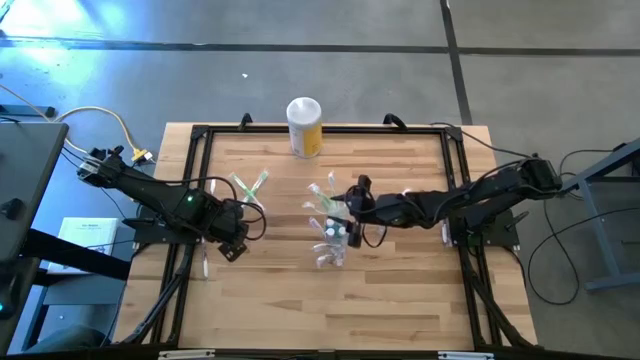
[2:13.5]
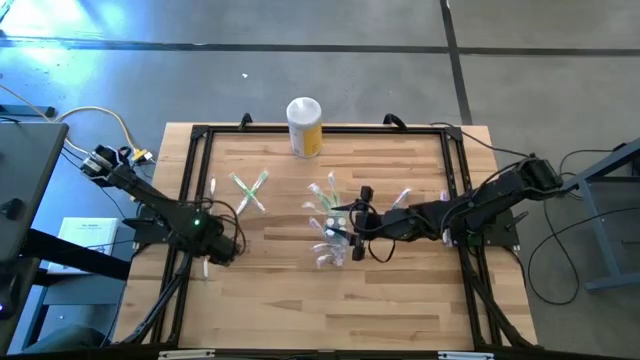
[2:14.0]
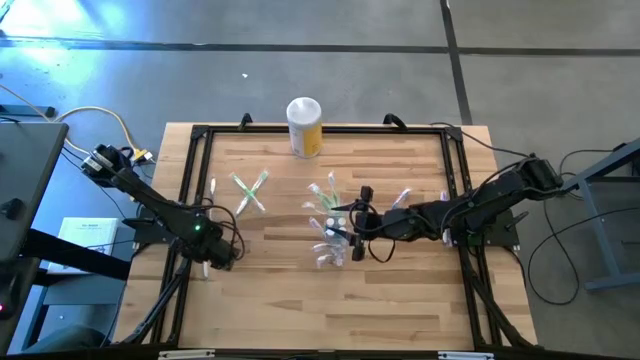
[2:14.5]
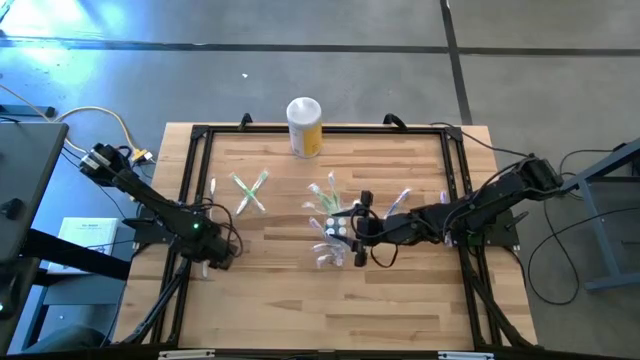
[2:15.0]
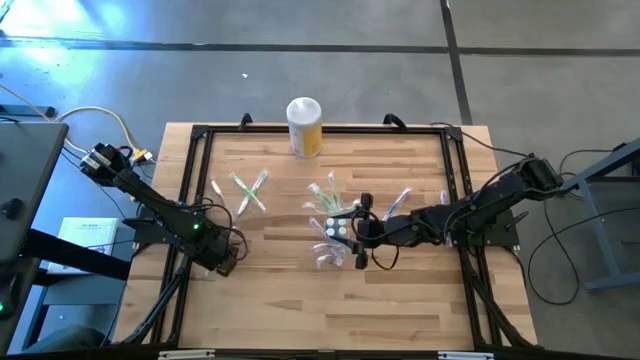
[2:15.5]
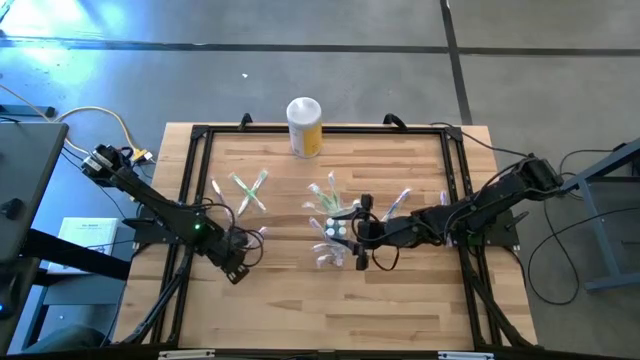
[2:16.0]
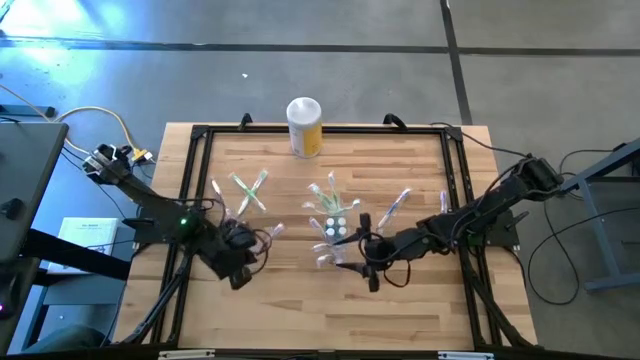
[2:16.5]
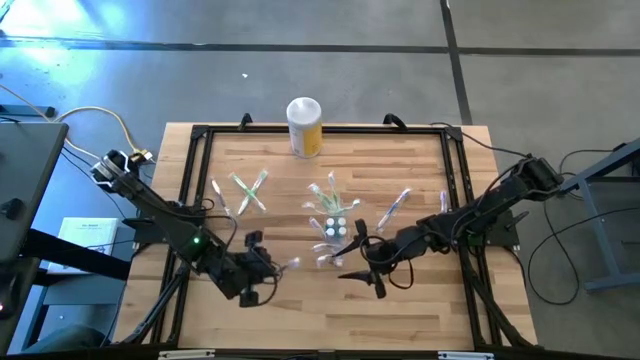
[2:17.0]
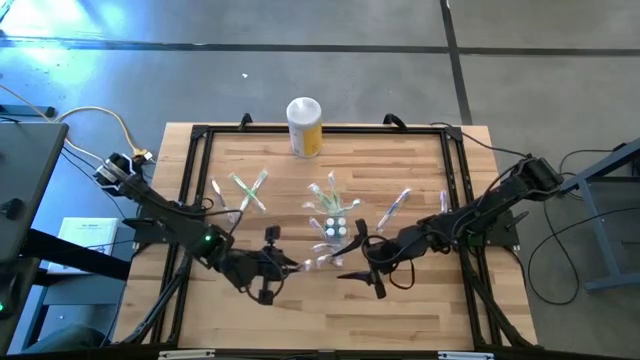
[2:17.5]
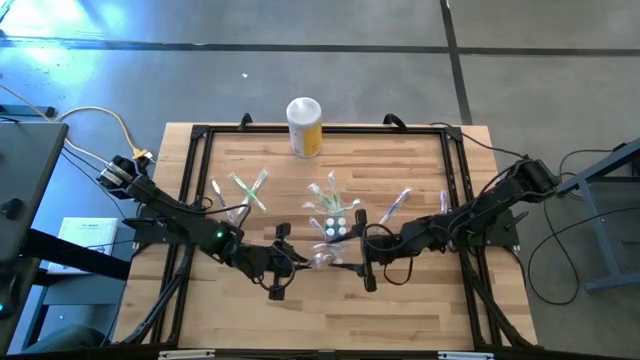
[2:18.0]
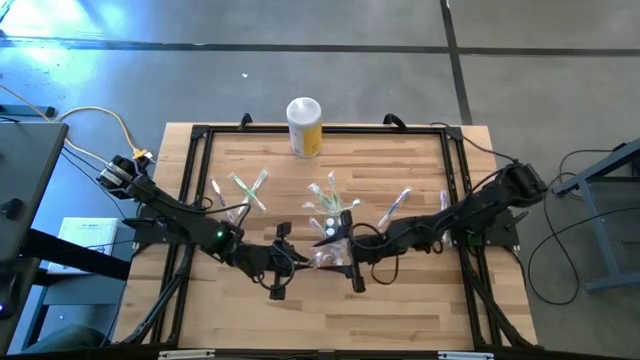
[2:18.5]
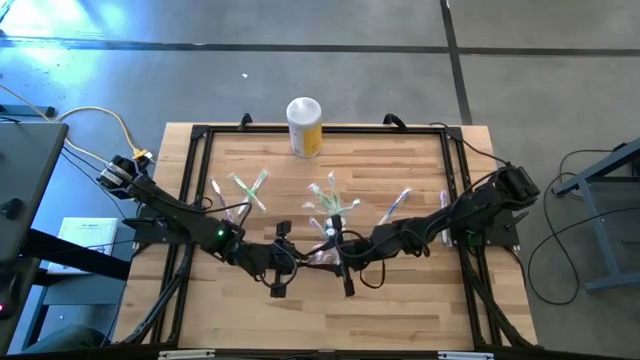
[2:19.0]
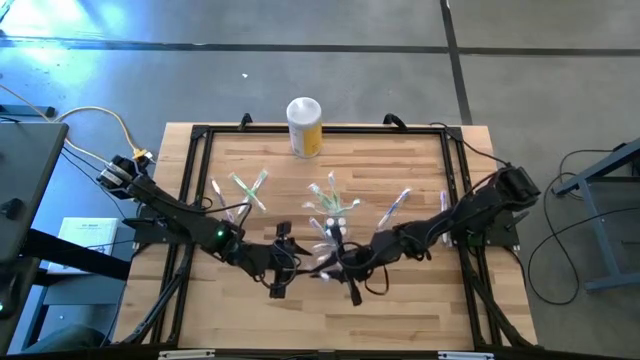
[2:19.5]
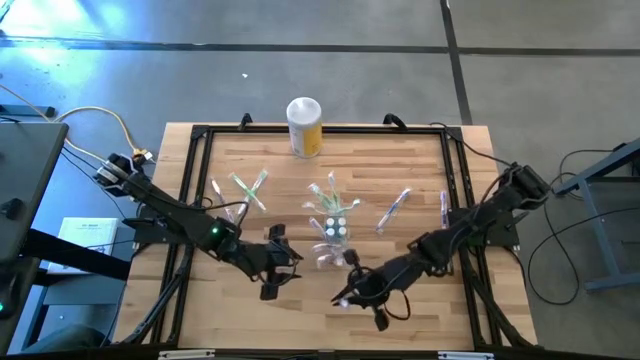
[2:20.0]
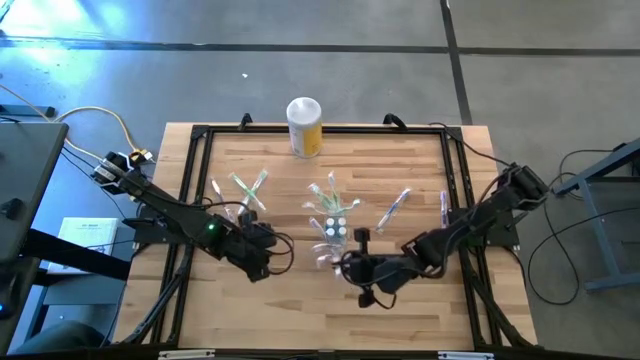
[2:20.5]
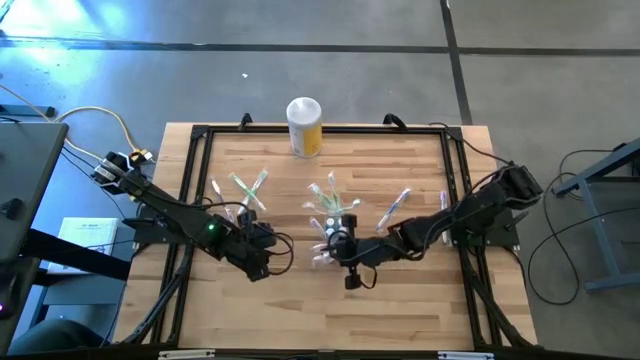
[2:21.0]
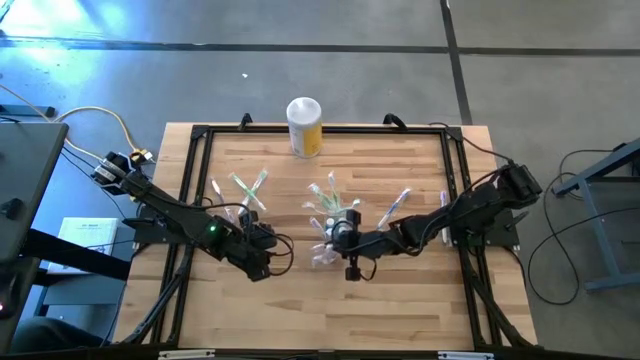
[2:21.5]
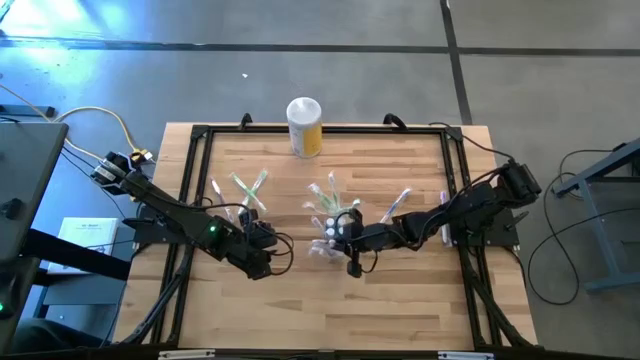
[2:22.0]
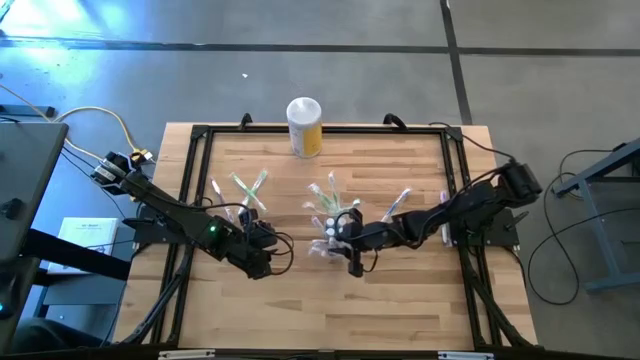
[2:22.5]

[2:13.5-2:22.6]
Task: Pick & Place toothbrushing station
Put the purple toothbrush into the transparent organizer

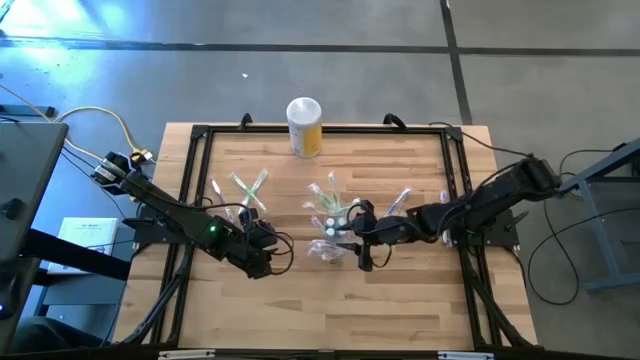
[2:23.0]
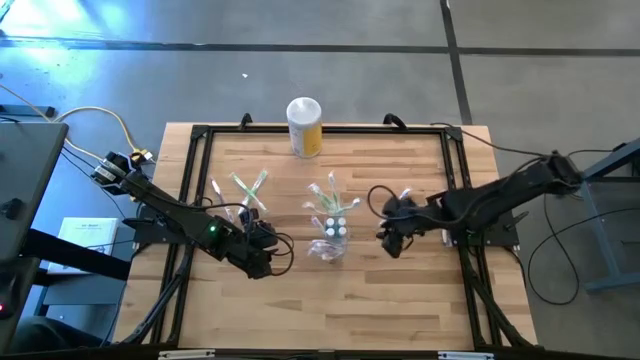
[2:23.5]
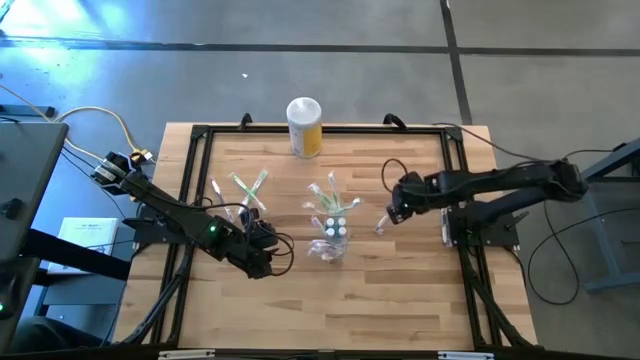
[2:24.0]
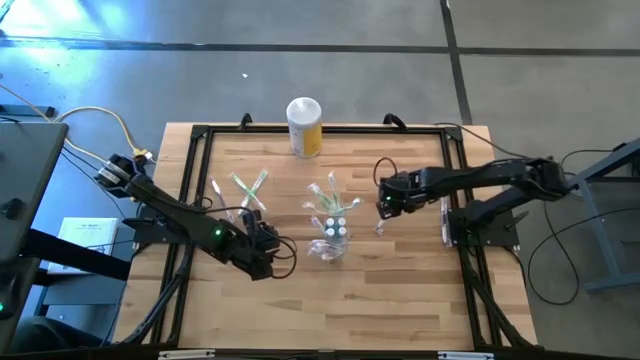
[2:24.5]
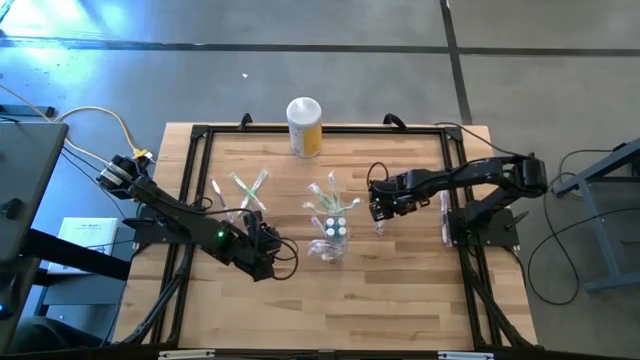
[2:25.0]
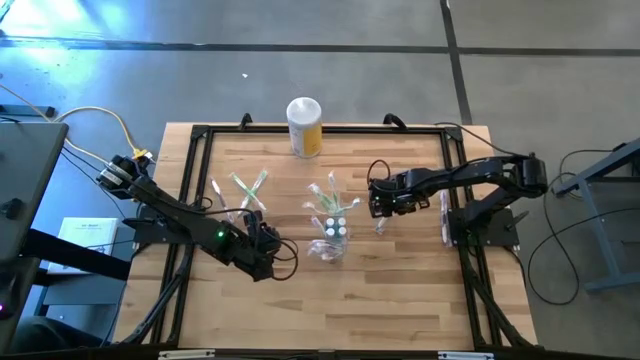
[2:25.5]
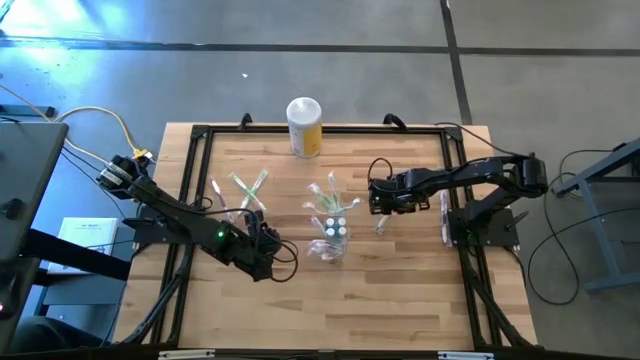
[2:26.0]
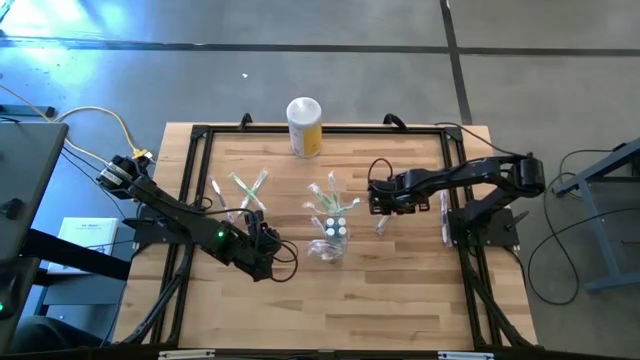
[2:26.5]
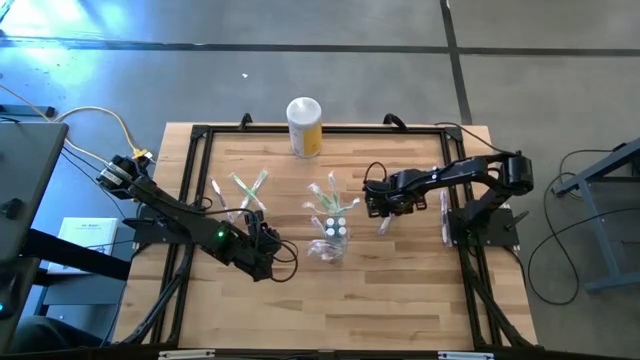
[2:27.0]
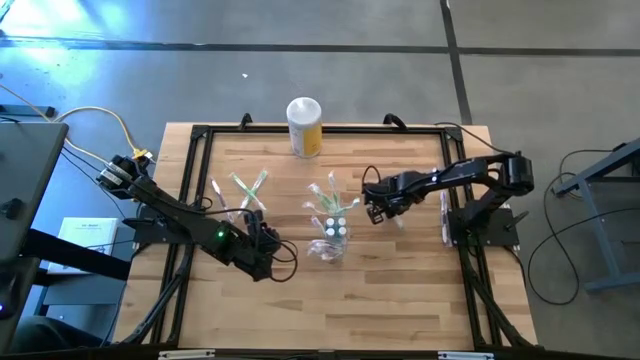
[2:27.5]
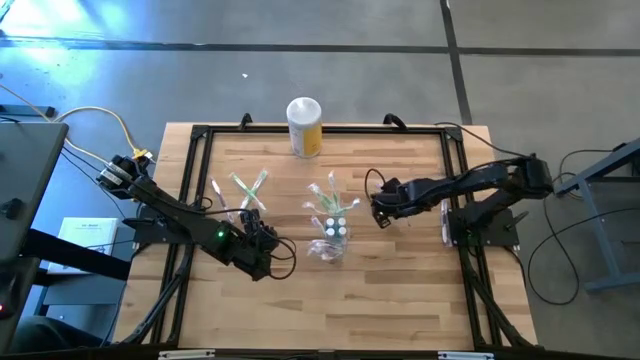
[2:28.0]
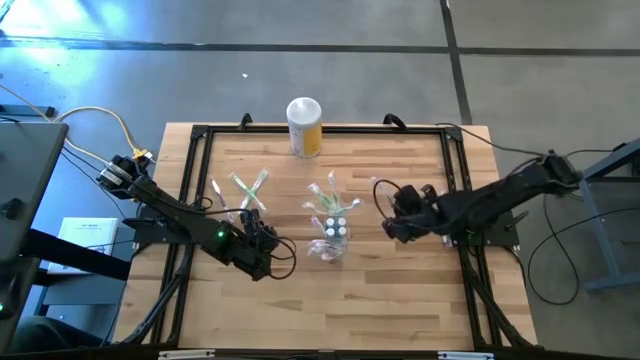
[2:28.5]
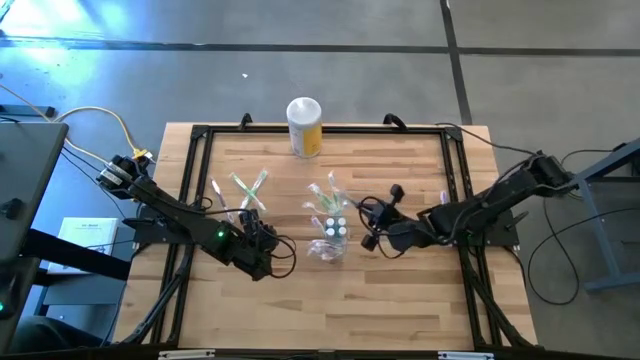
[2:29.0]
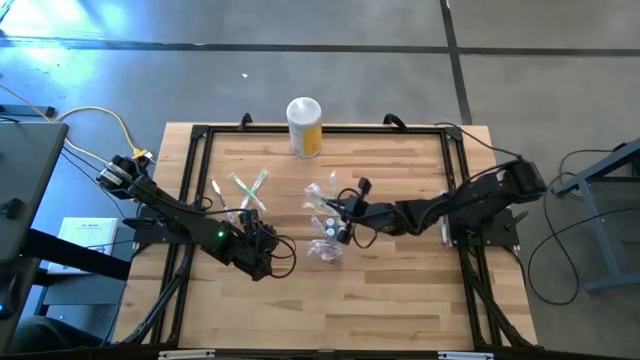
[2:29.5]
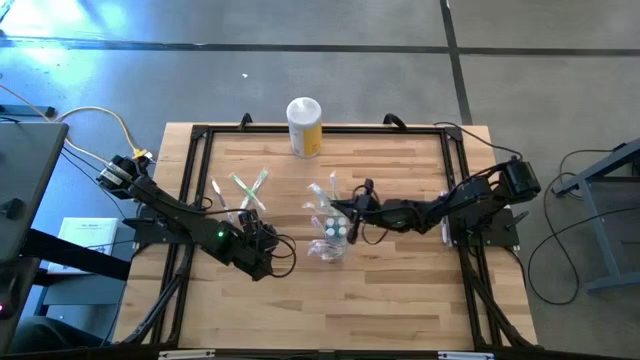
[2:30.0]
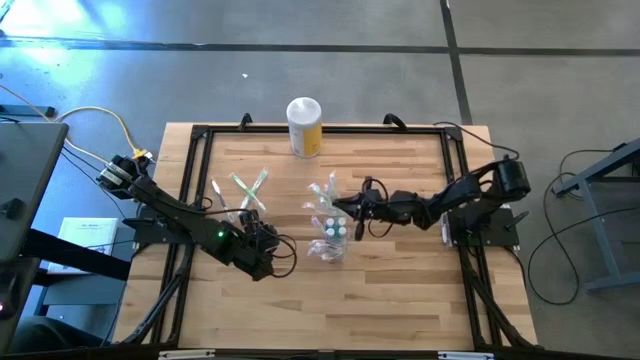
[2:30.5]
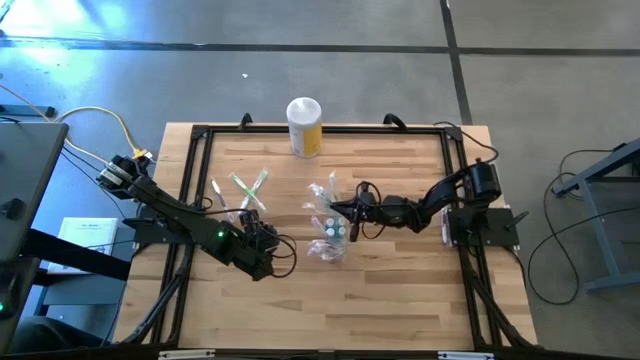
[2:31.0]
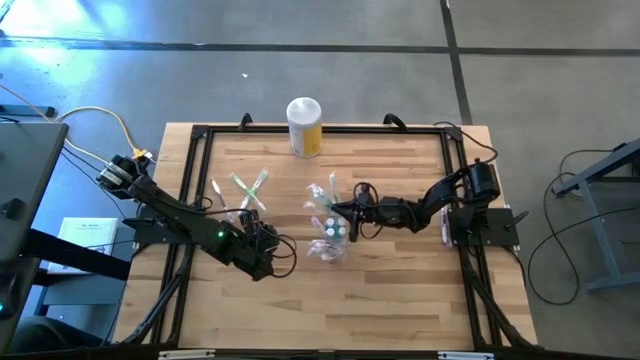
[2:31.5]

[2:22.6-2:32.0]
Put the blue toothbrush into the transparent organizer

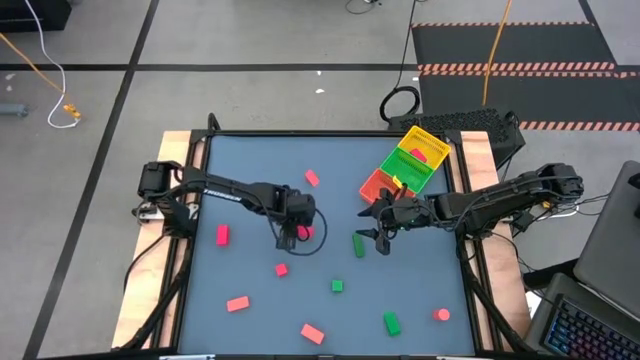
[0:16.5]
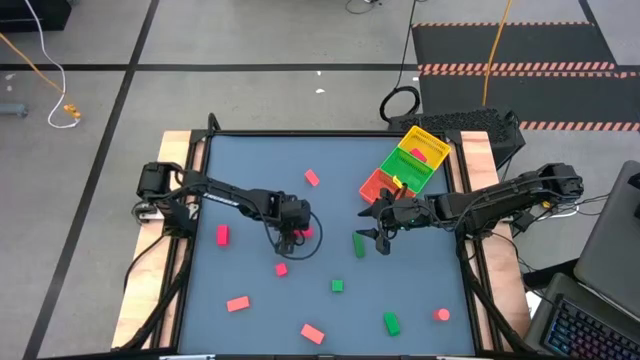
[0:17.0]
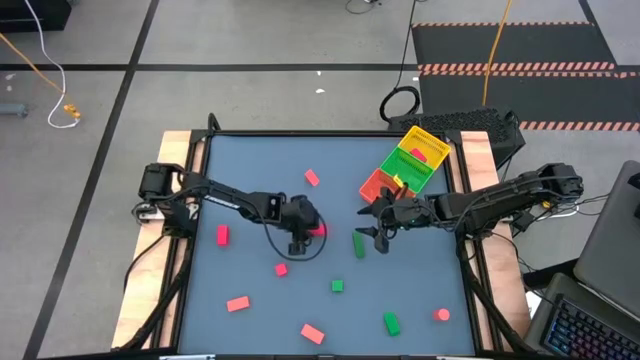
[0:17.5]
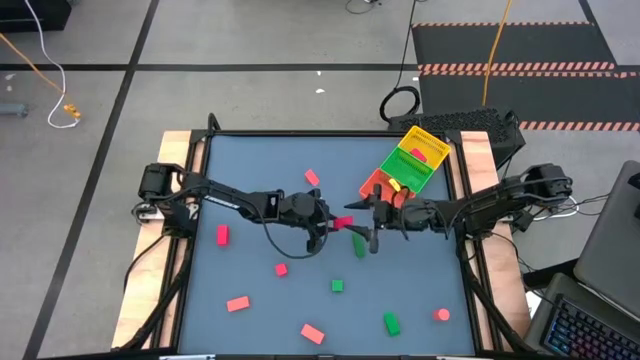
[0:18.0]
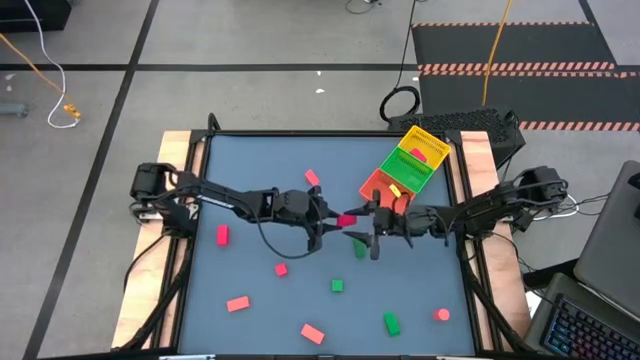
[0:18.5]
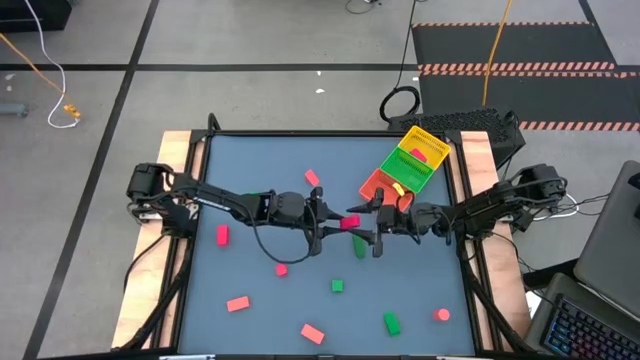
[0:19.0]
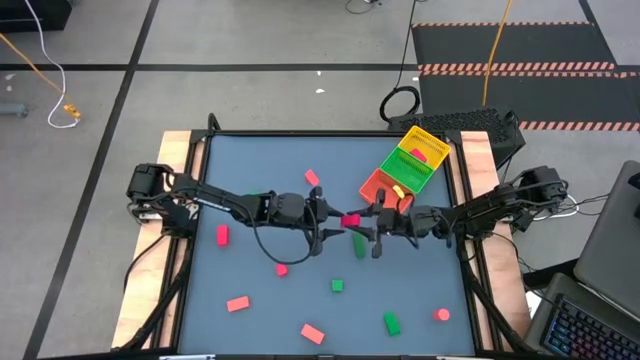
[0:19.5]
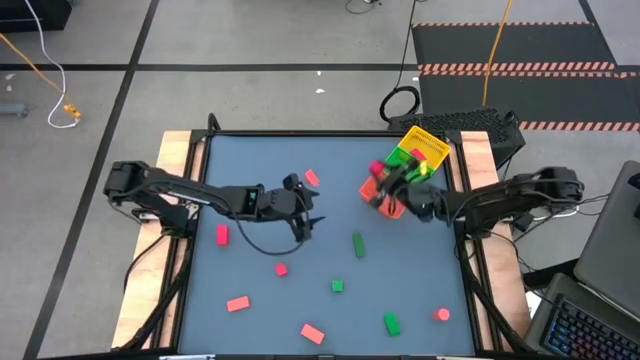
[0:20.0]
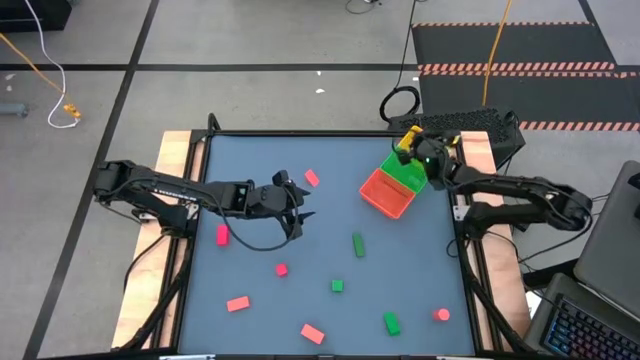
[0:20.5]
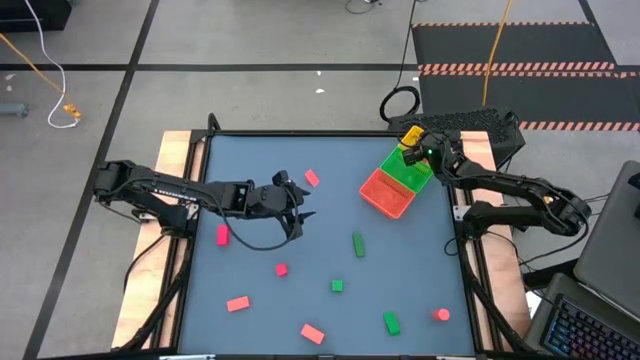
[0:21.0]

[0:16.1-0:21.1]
Task: Sort & place blocks by color
Put the red block into the yellow bin
